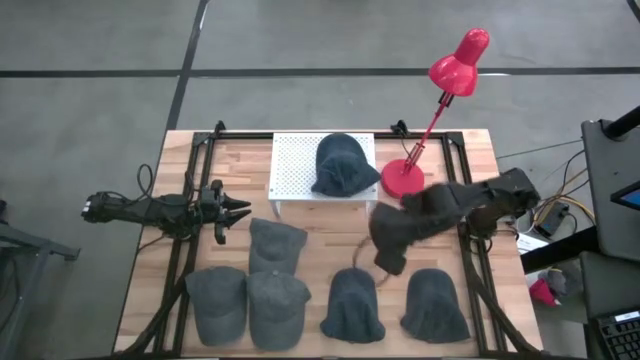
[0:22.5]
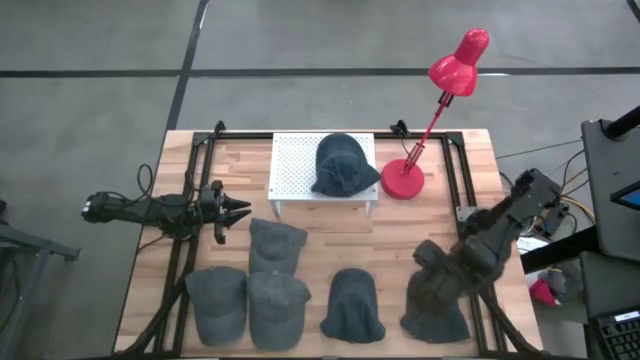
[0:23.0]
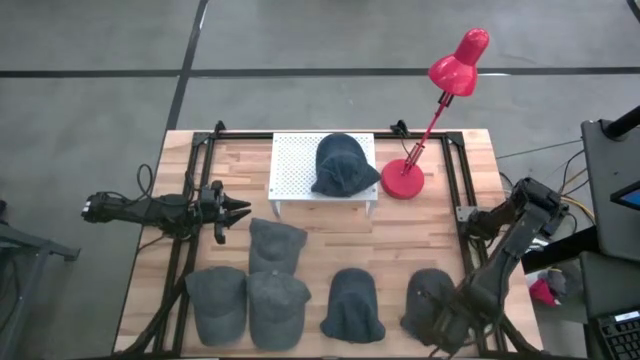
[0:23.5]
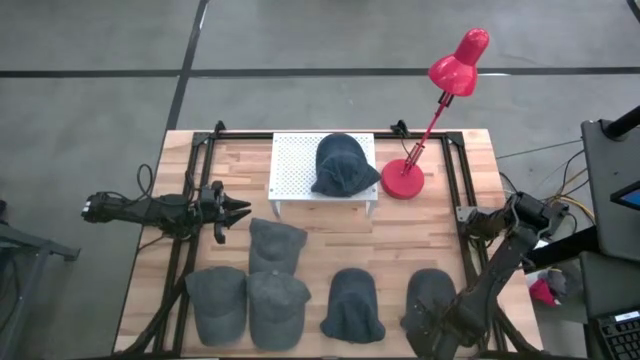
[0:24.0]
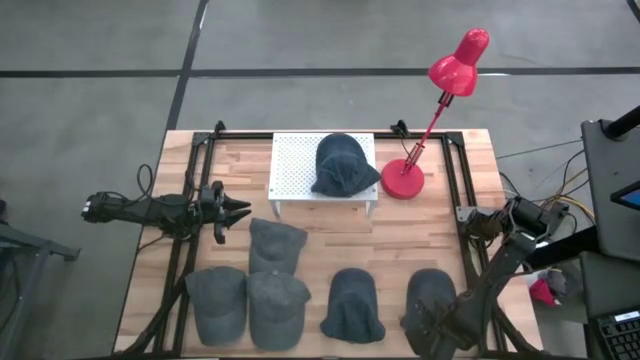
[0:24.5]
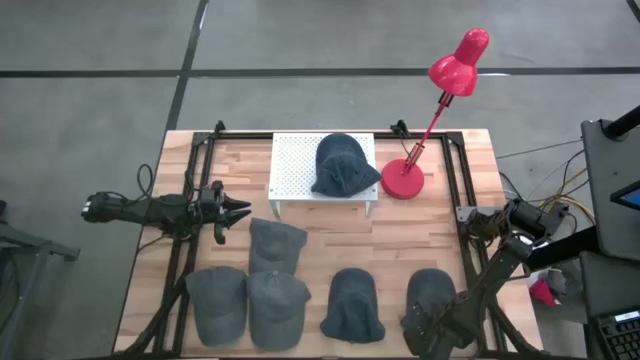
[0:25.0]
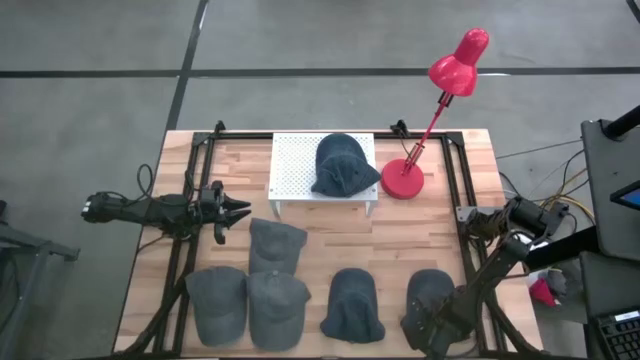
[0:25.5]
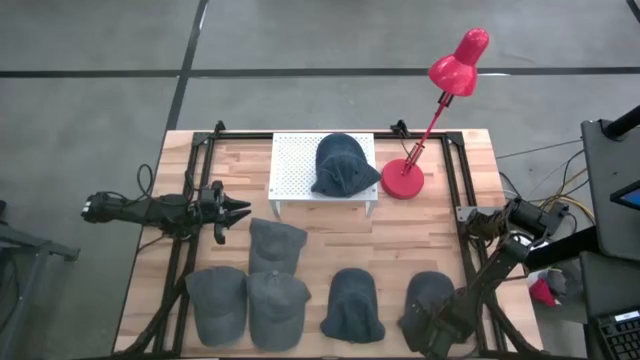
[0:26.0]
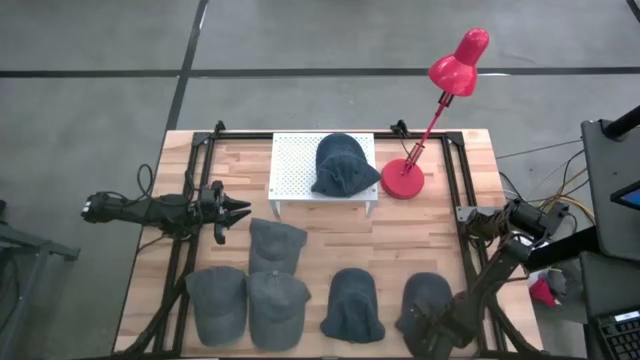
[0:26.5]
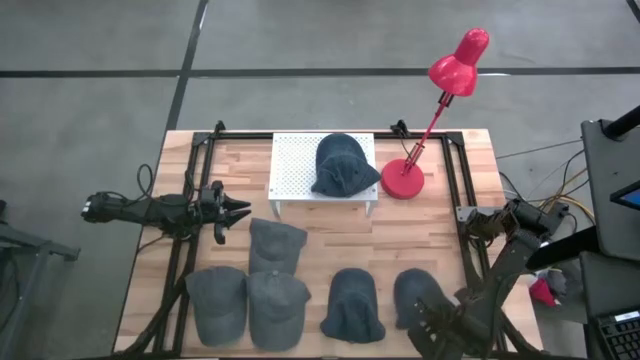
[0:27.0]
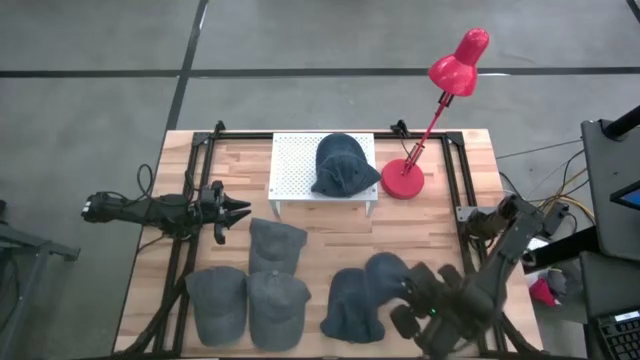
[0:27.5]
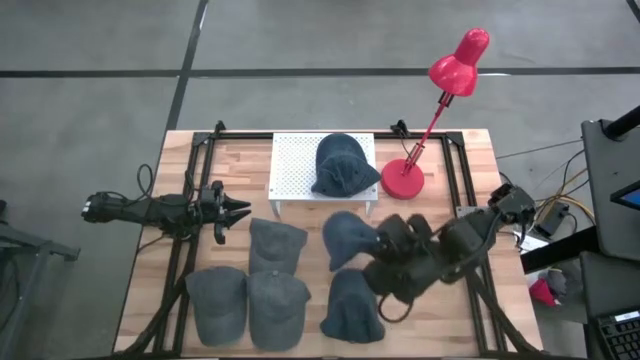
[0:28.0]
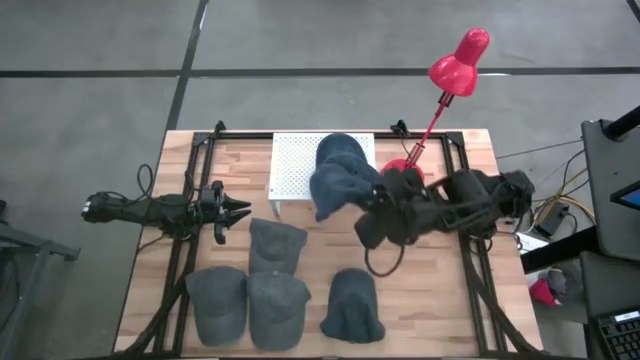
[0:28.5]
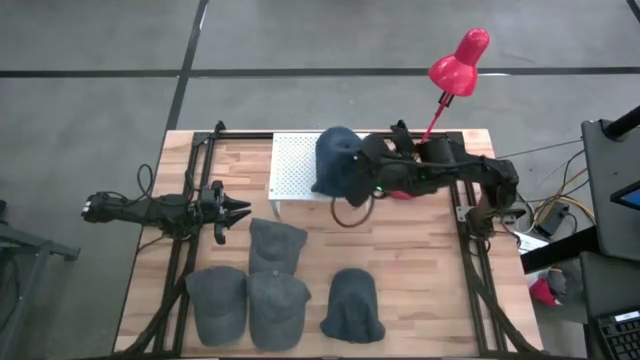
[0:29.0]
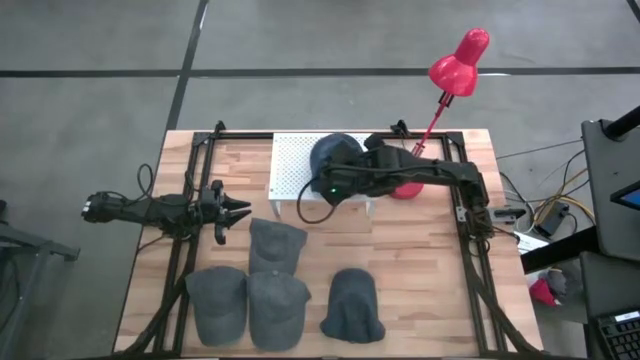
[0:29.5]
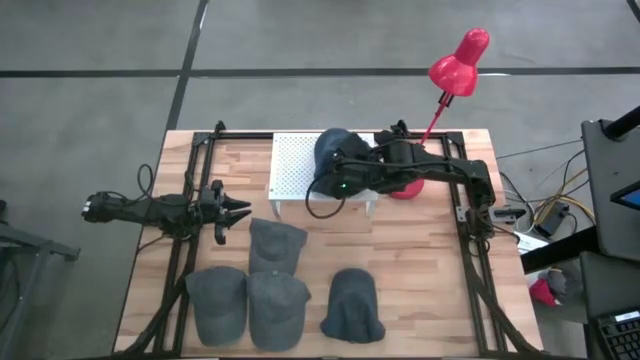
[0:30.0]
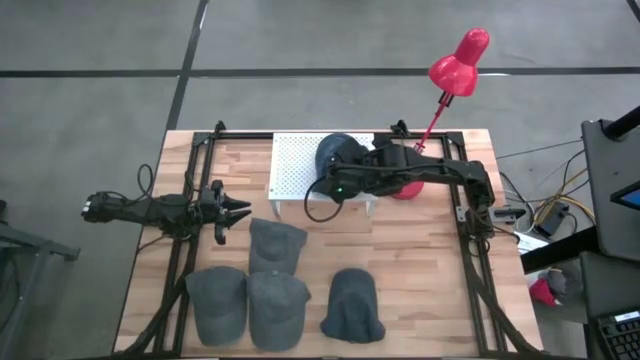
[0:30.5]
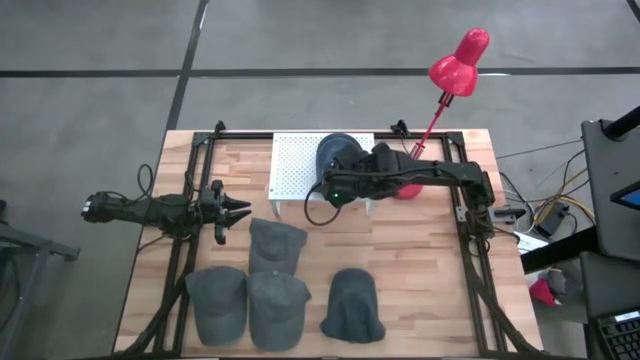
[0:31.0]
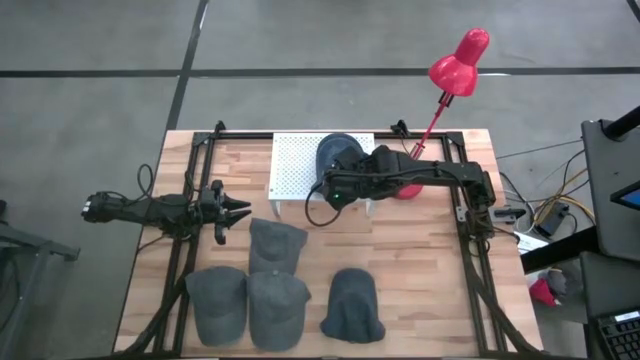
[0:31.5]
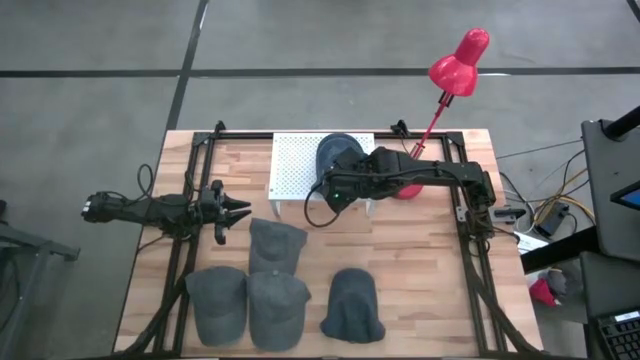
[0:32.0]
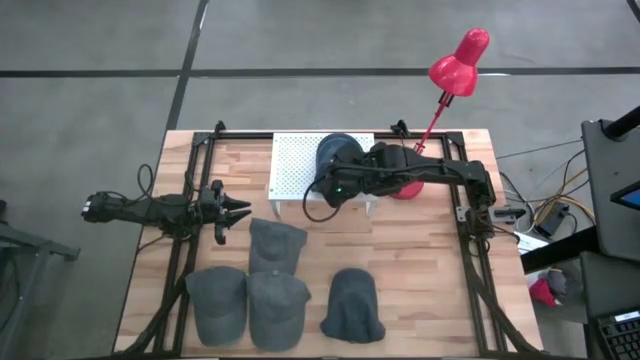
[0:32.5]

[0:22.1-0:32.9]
Task: Pick & Place hat
Stack the right blue cap on the blue cap on the shelf

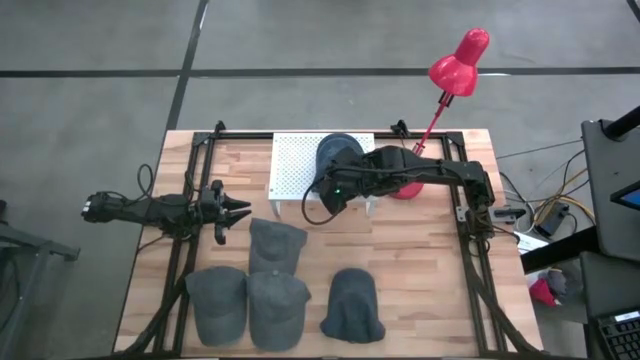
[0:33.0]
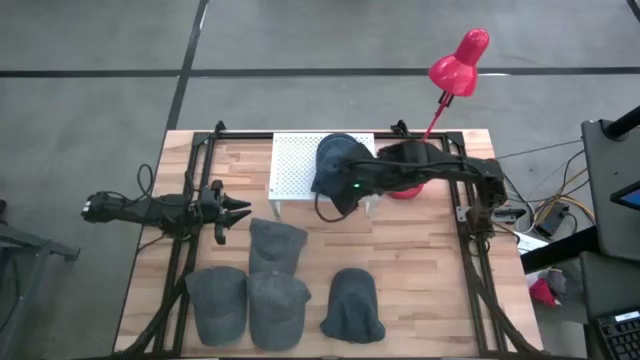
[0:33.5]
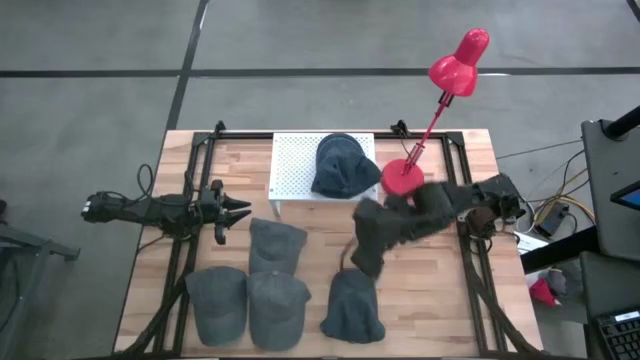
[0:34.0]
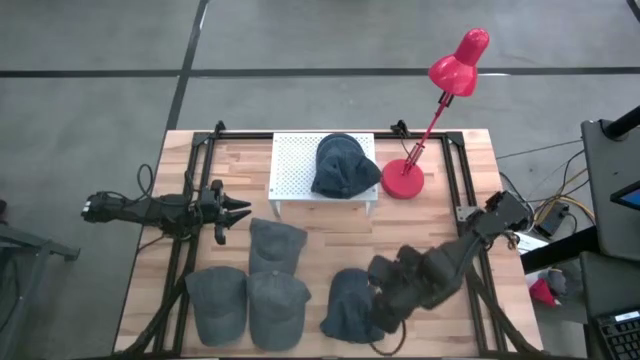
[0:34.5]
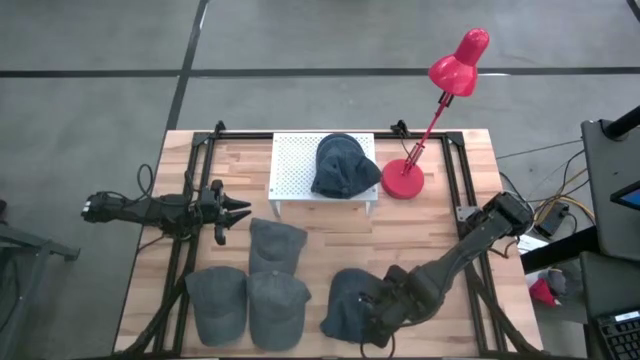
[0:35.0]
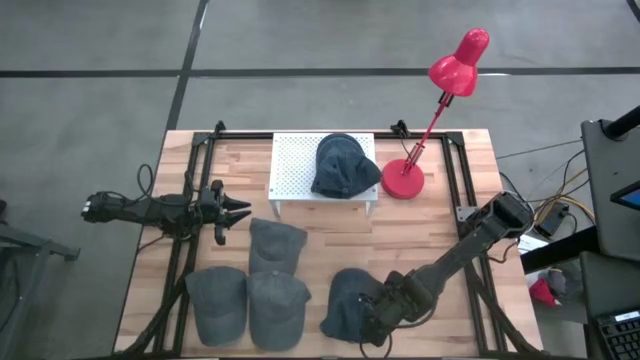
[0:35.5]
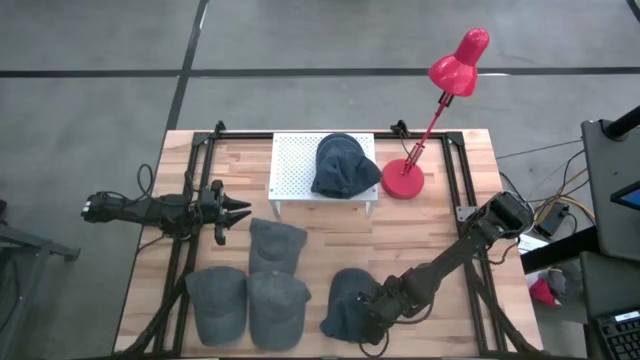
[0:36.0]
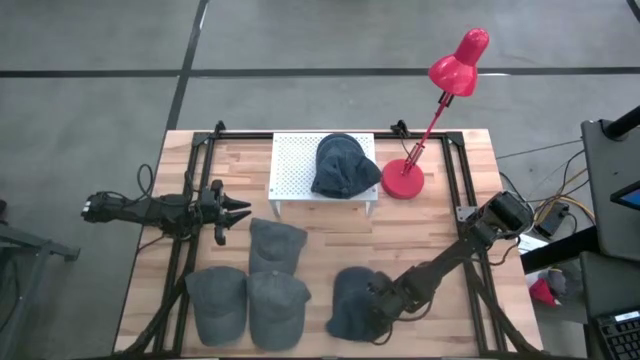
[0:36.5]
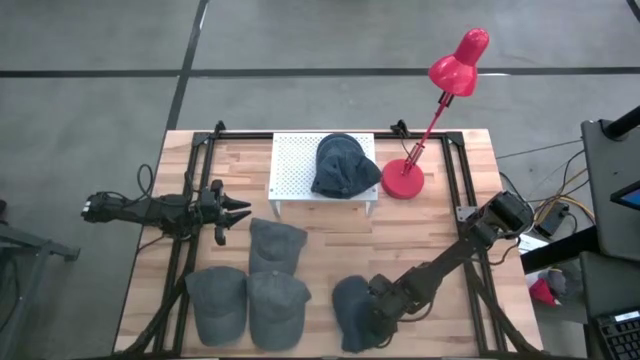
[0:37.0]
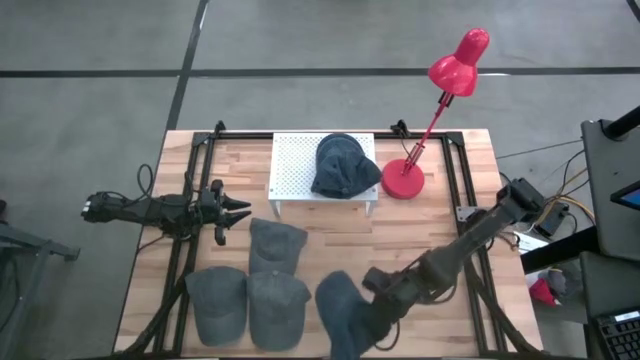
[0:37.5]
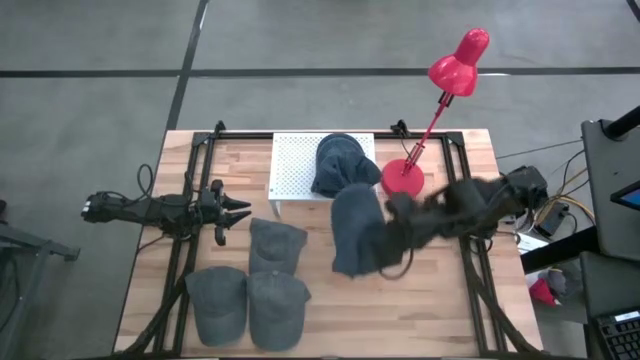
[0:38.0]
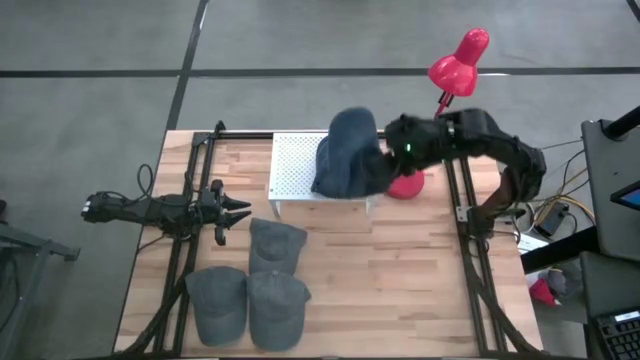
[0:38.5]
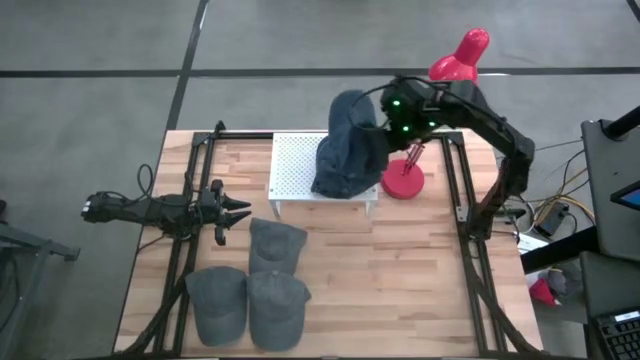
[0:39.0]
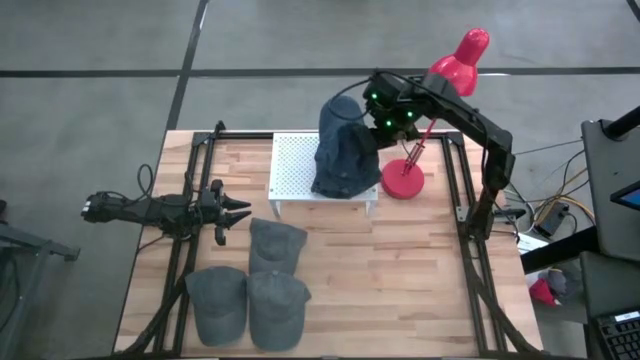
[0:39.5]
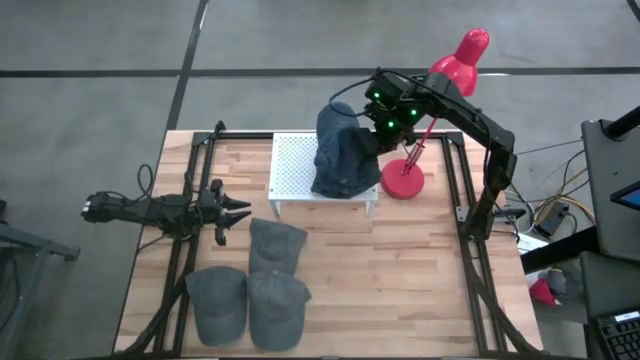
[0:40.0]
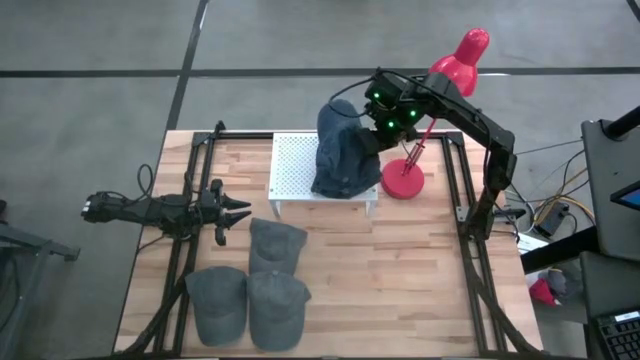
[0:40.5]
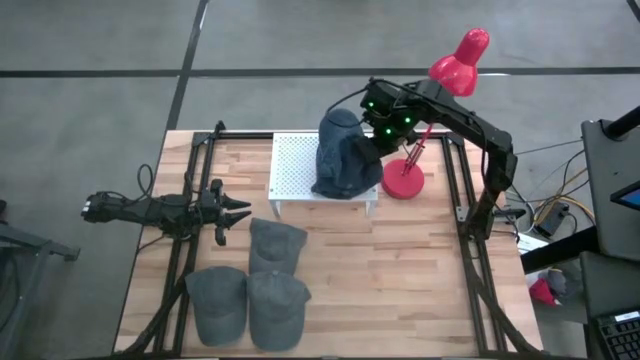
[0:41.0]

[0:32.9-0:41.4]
Stack the blue cap on the blue cap on the shelf

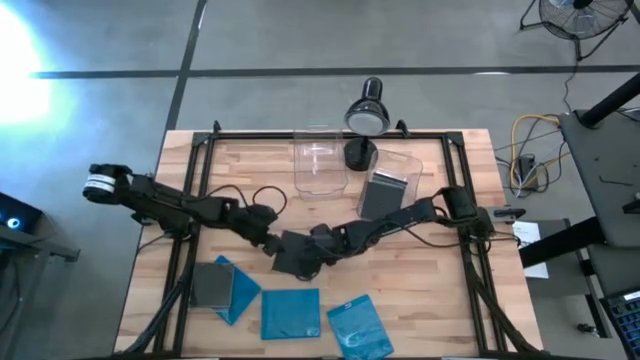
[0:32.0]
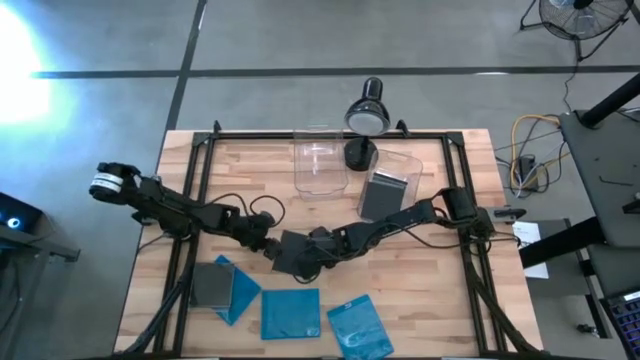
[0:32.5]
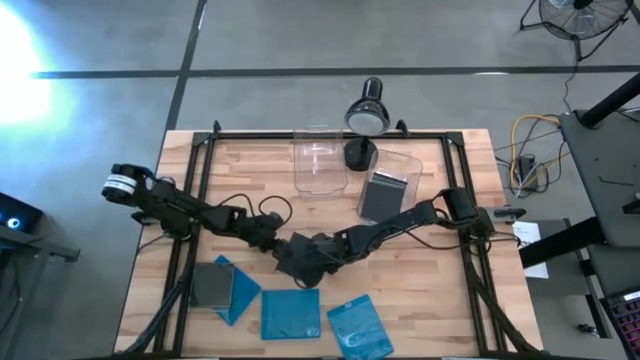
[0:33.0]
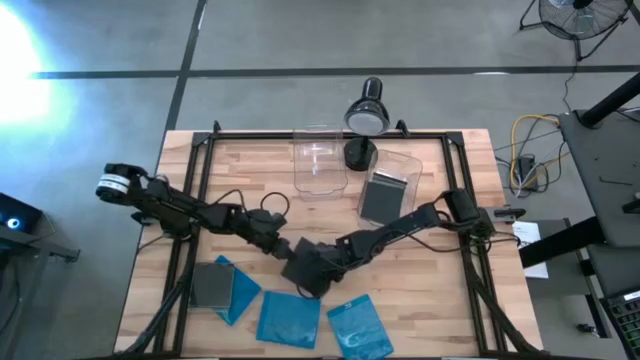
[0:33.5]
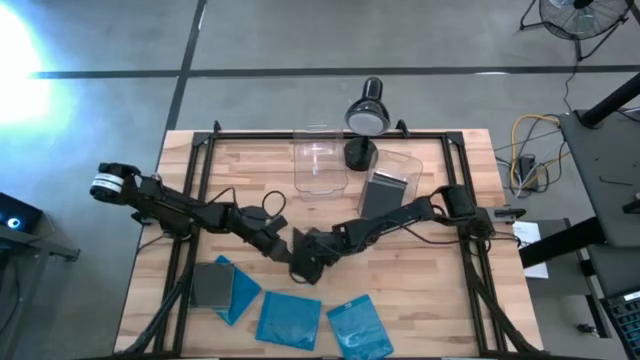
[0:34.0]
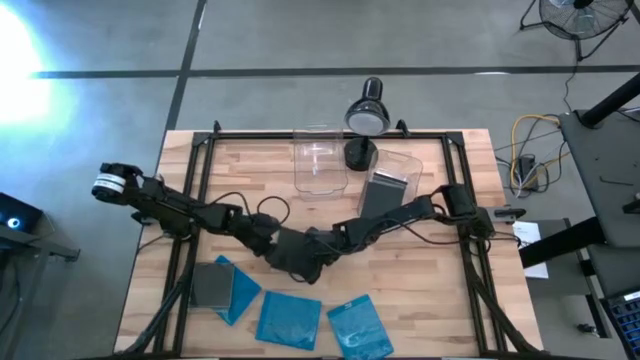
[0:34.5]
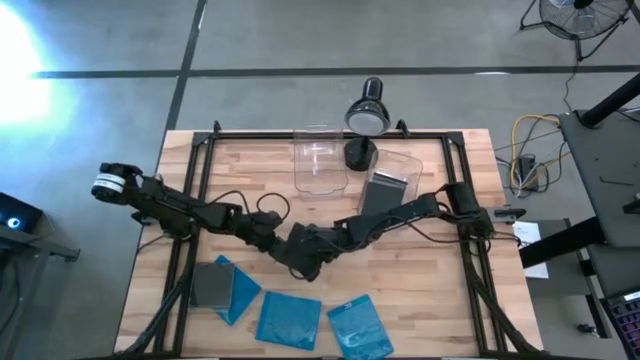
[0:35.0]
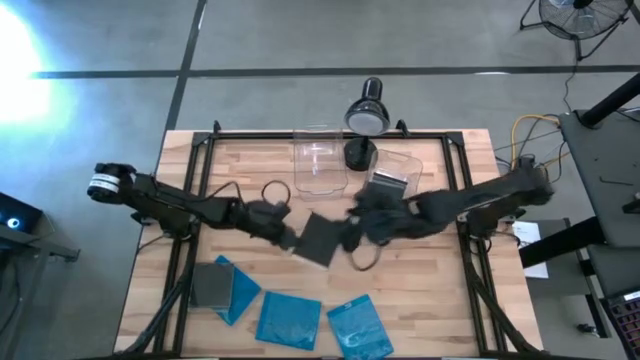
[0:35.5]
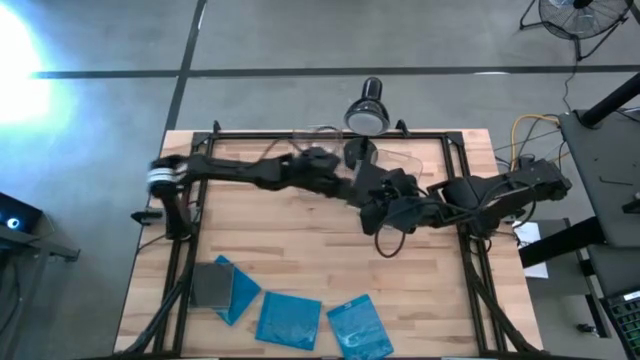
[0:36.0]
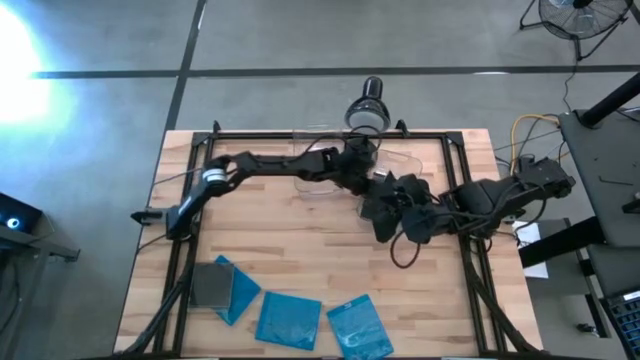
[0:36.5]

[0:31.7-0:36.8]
Task: Pick & place jewel cases by type
Put the black CD case into the right transparent bin
